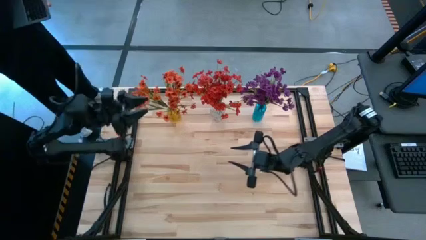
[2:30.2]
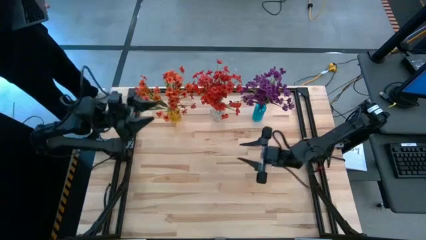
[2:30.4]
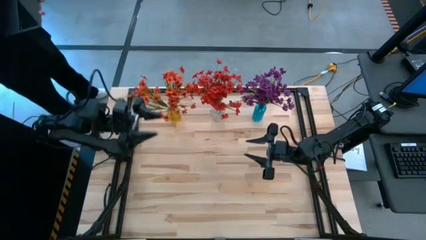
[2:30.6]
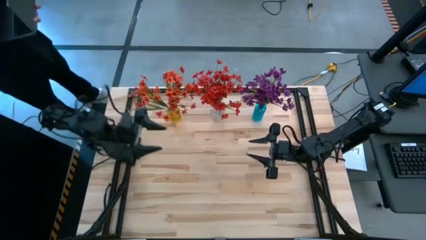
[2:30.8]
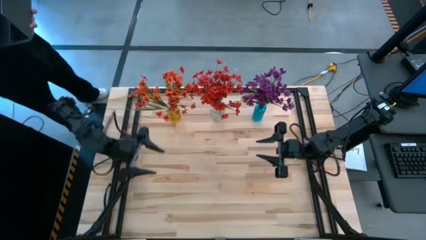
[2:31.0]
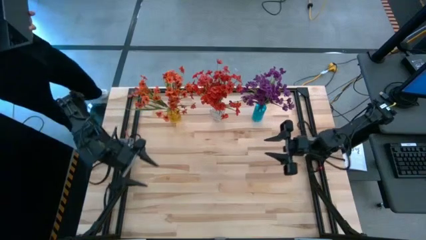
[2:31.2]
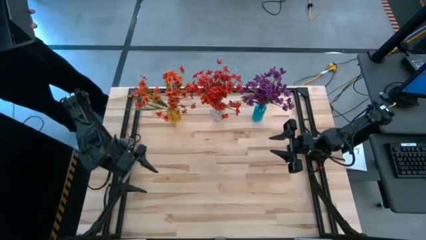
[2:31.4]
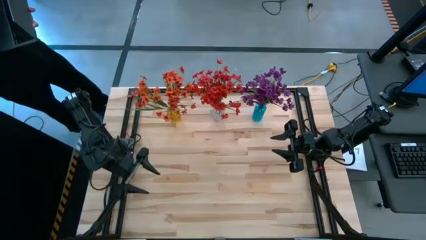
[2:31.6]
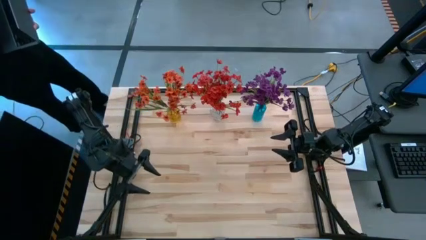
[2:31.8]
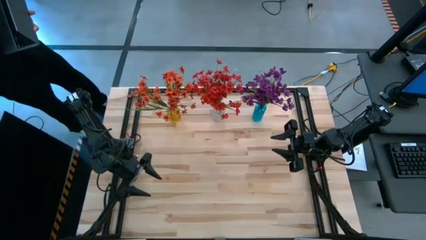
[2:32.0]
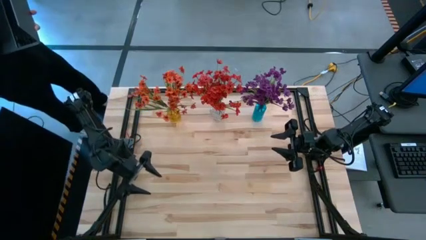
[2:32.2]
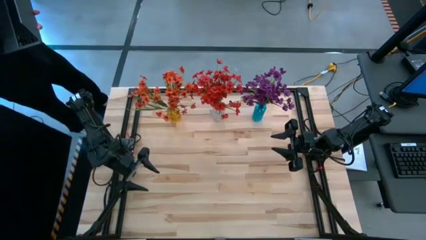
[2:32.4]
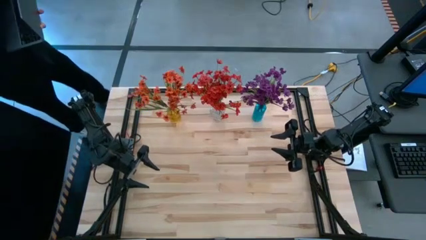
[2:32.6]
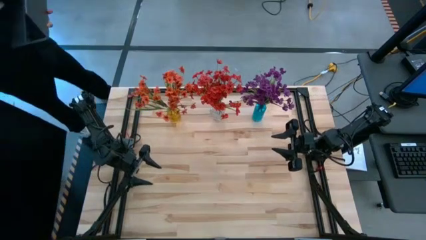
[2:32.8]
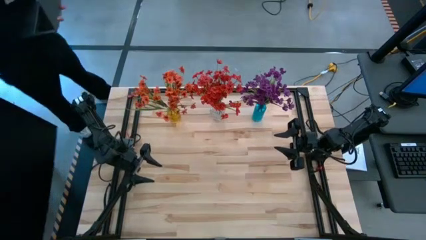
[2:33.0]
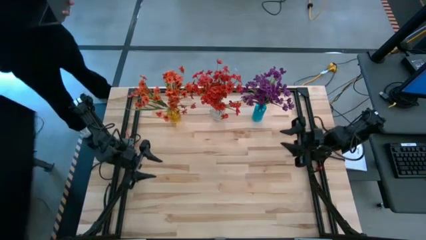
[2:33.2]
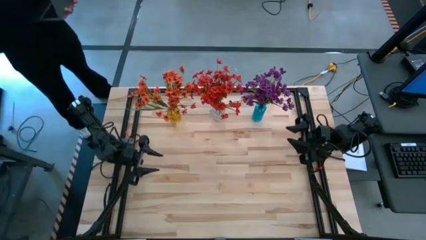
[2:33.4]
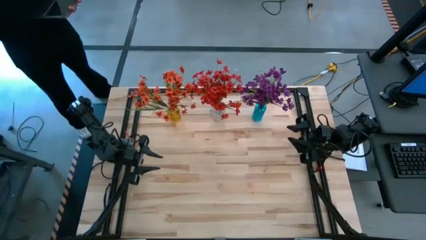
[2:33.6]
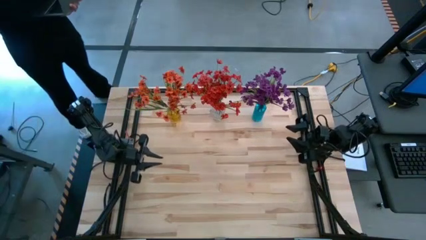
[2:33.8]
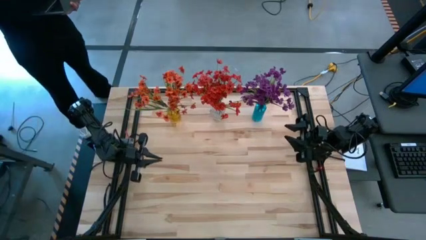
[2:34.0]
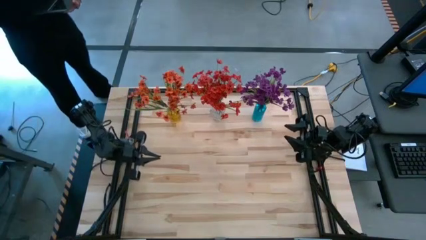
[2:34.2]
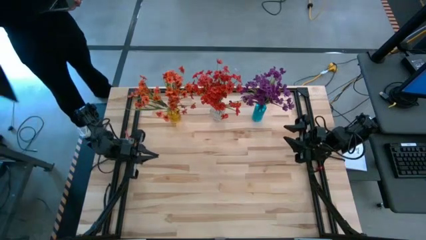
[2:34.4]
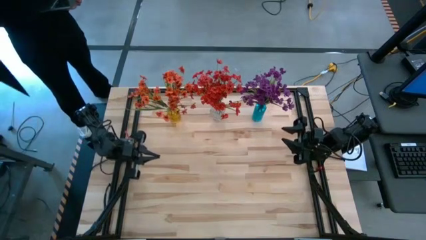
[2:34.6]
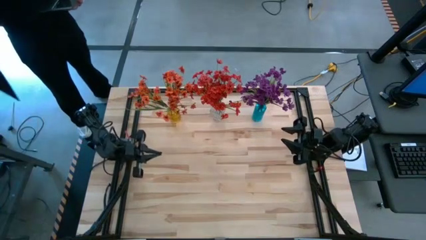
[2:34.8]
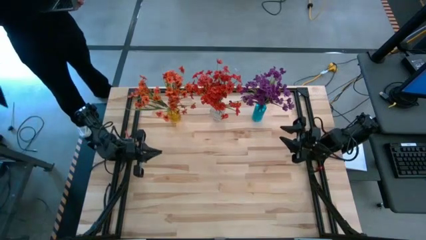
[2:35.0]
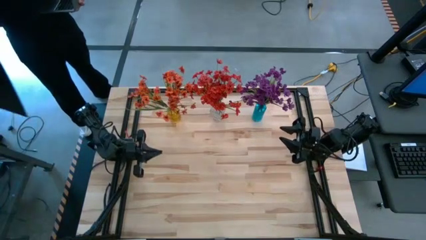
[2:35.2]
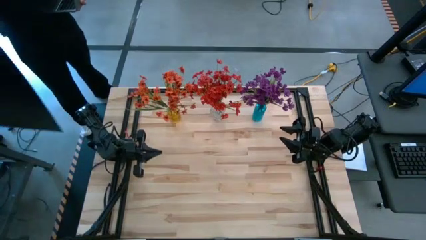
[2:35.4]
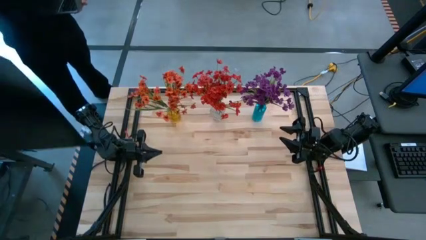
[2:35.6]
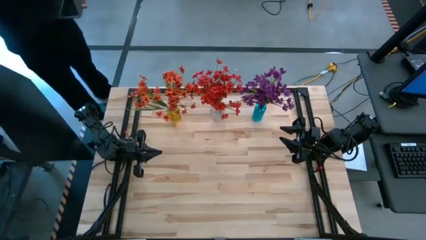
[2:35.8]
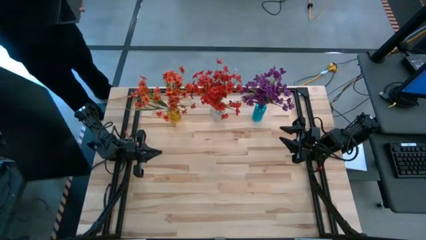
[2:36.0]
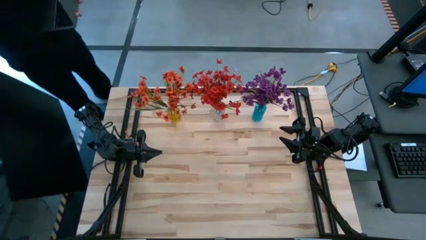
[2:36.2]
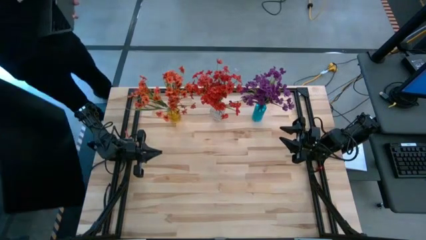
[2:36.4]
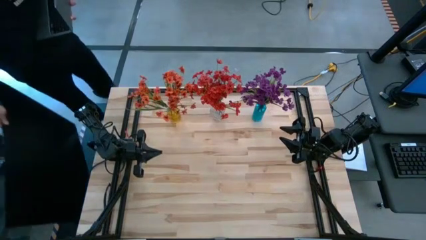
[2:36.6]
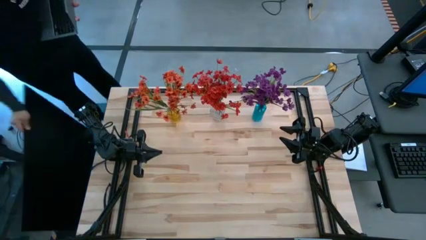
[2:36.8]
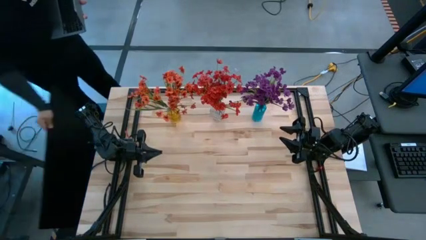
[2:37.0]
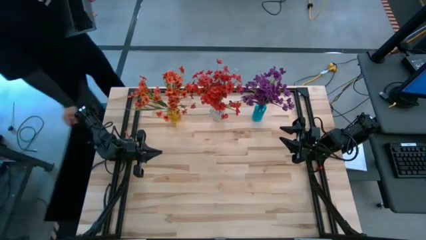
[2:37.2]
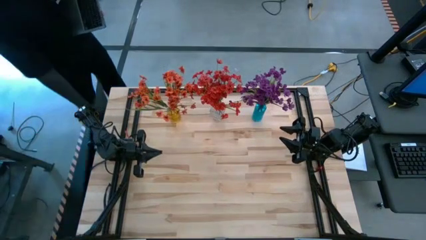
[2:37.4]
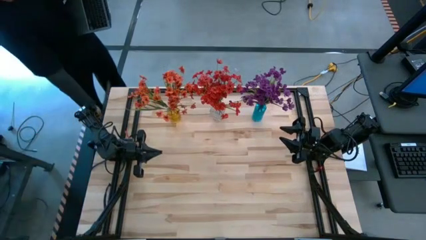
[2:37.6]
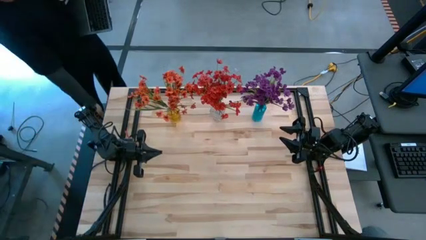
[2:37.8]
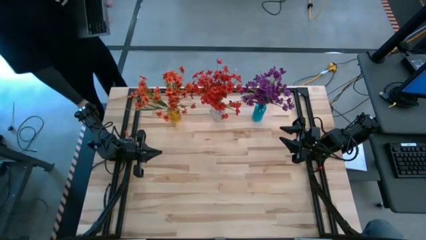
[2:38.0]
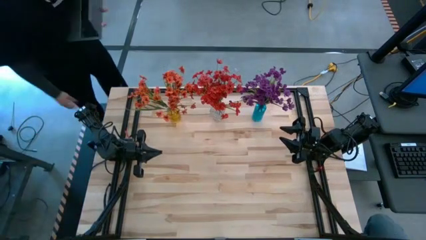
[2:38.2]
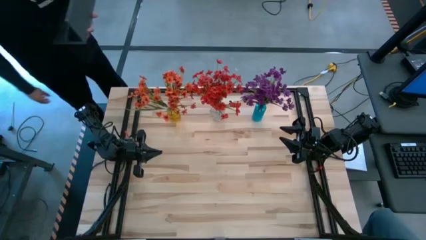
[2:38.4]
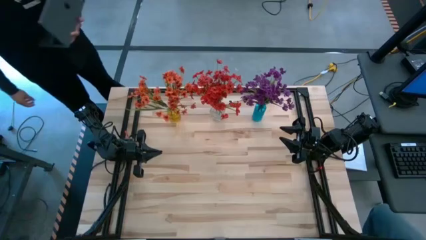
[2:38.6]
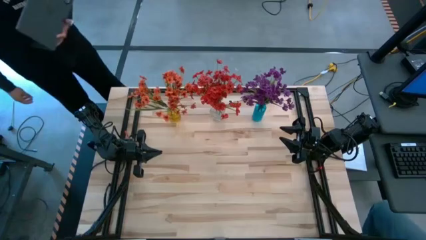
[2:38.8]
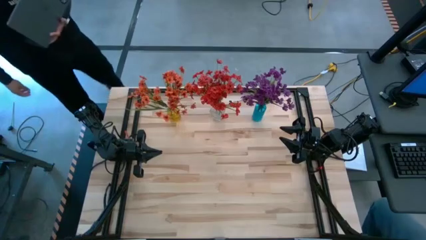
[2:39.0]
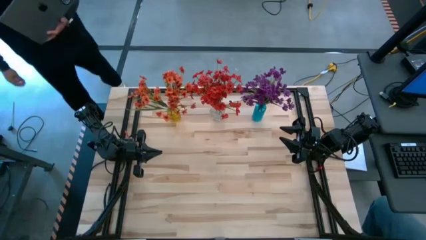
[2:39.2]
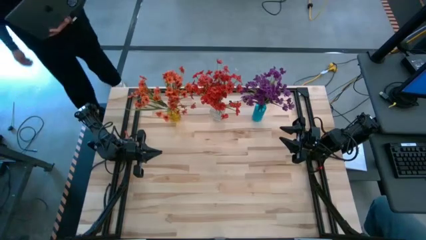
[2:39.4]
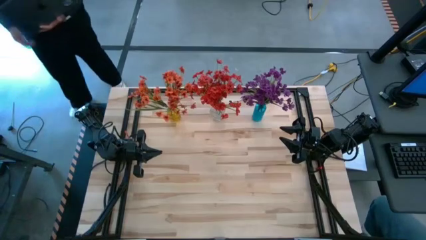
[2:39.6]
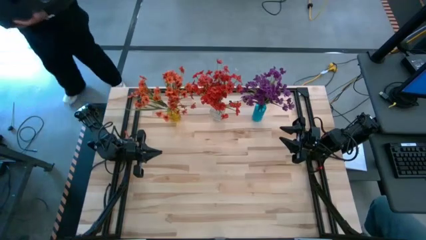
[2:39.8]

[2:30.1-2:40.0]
Task: Sort flowers into vase by color
Return to Home Position

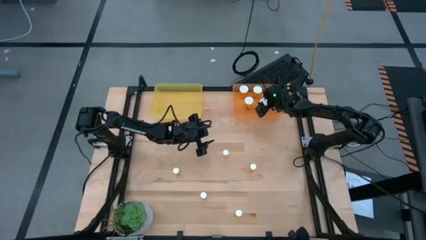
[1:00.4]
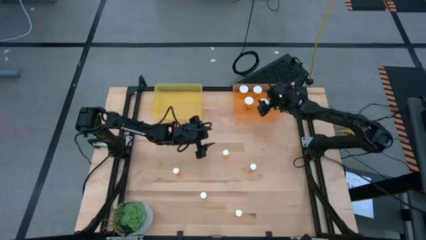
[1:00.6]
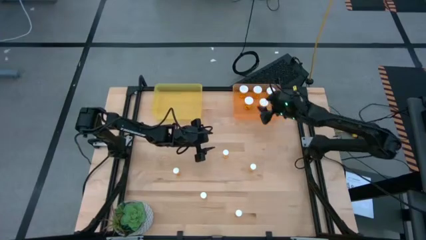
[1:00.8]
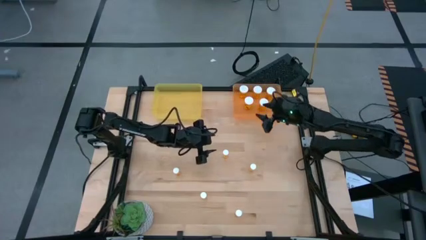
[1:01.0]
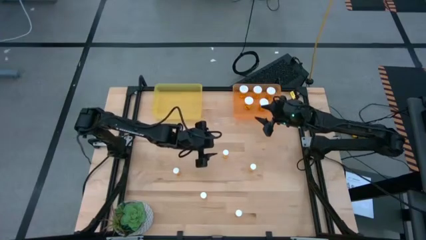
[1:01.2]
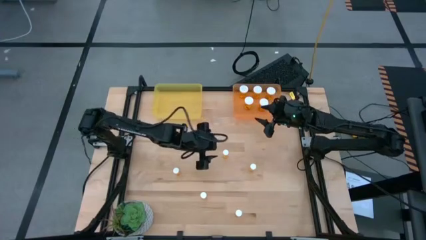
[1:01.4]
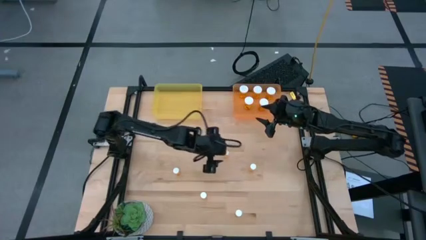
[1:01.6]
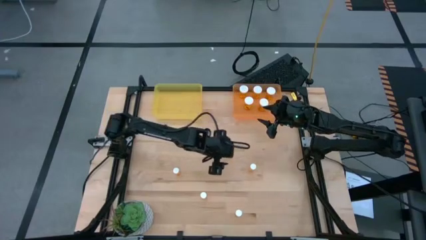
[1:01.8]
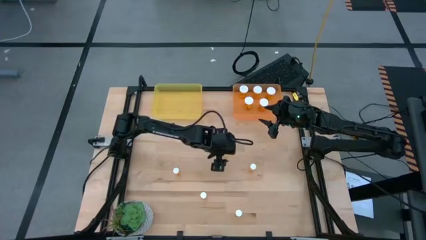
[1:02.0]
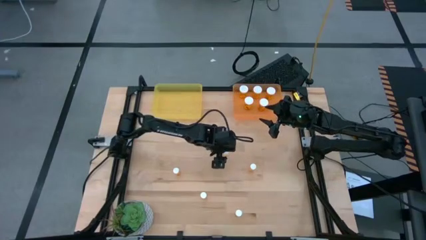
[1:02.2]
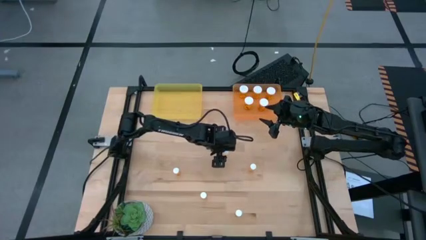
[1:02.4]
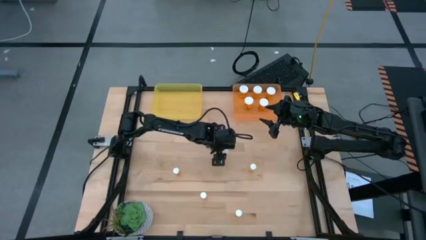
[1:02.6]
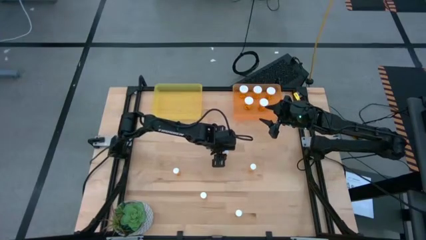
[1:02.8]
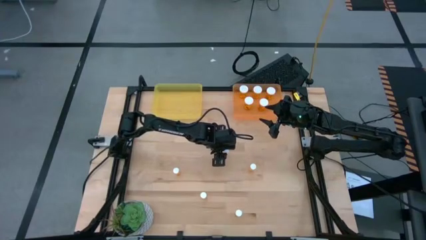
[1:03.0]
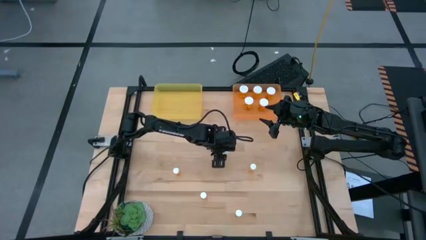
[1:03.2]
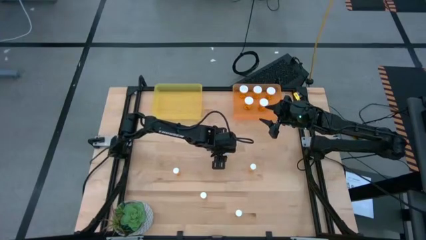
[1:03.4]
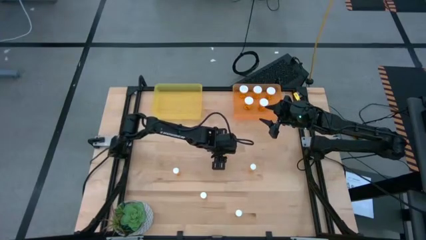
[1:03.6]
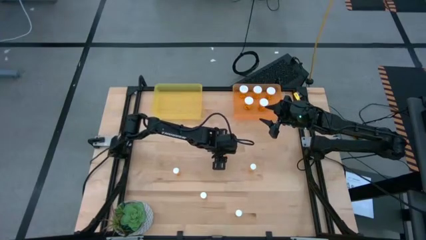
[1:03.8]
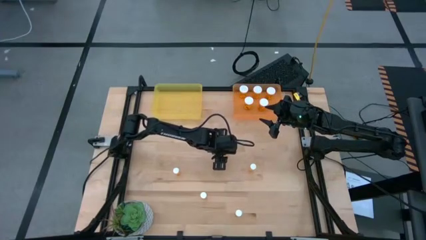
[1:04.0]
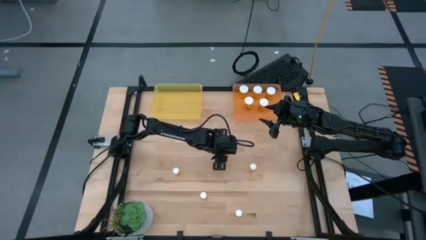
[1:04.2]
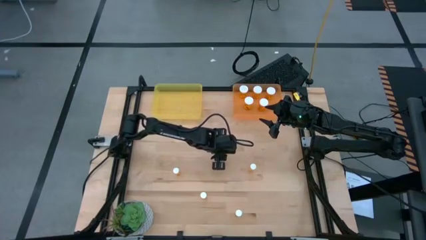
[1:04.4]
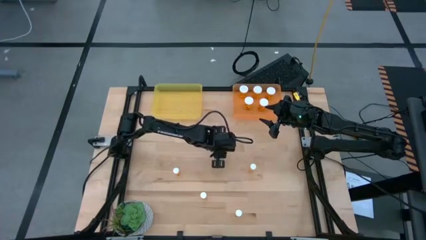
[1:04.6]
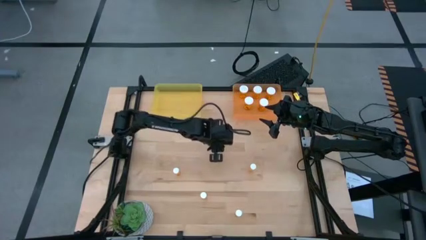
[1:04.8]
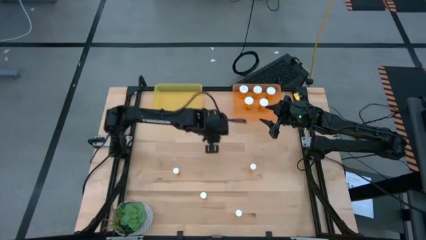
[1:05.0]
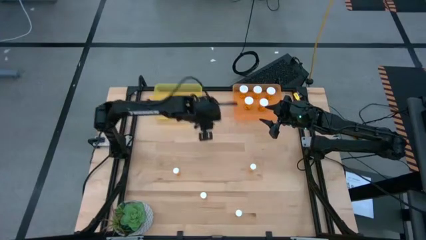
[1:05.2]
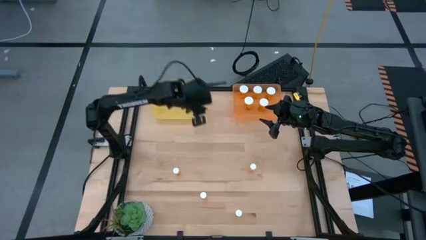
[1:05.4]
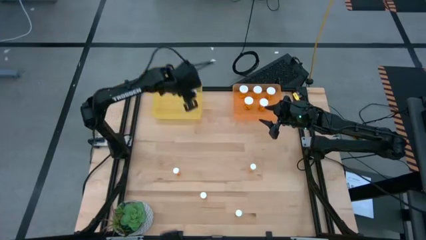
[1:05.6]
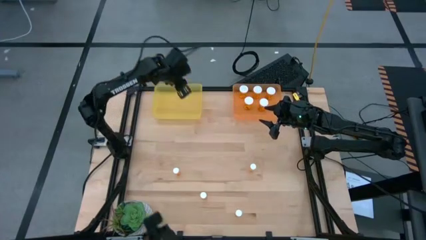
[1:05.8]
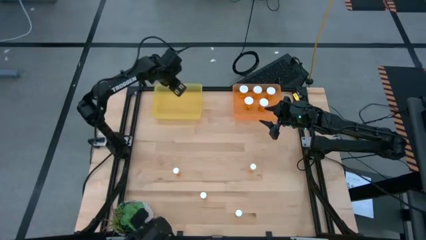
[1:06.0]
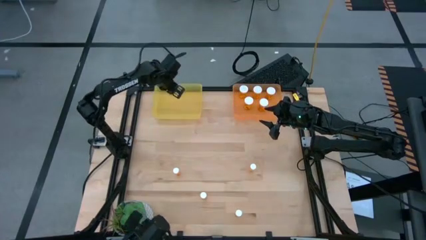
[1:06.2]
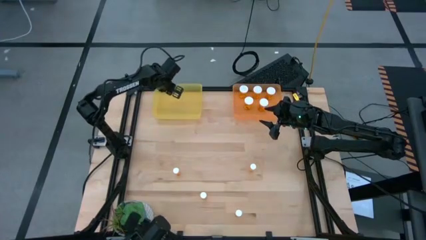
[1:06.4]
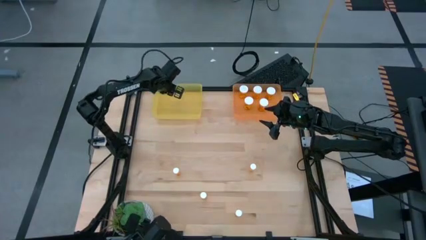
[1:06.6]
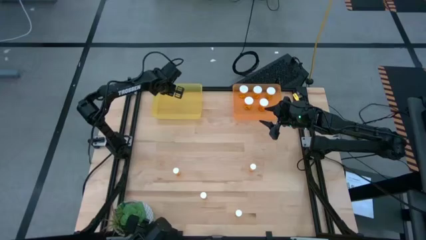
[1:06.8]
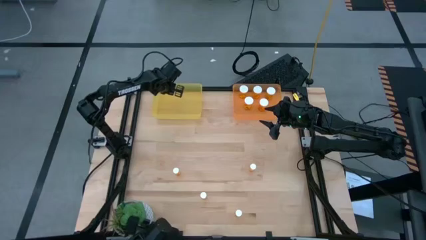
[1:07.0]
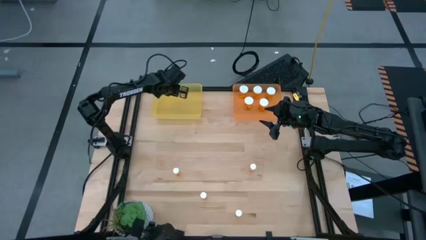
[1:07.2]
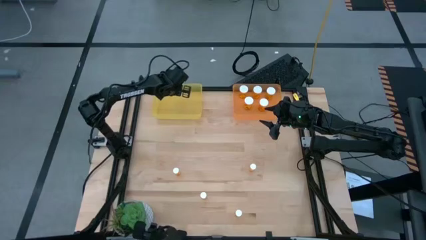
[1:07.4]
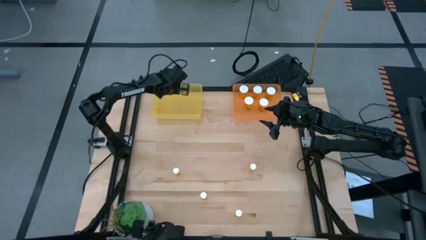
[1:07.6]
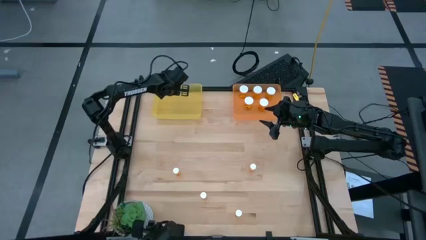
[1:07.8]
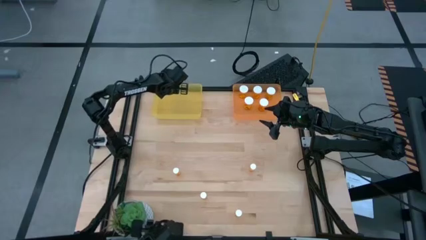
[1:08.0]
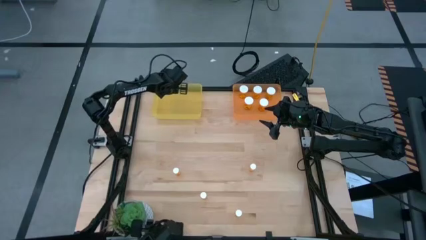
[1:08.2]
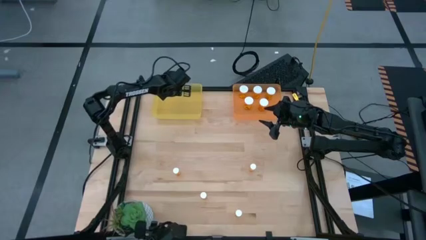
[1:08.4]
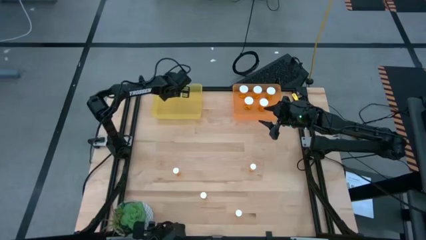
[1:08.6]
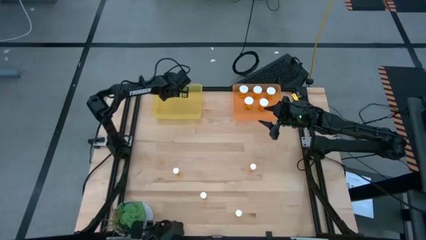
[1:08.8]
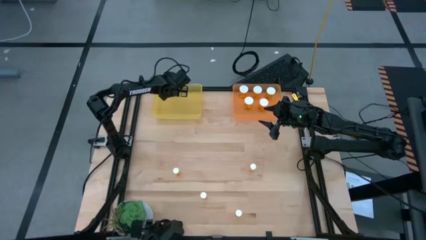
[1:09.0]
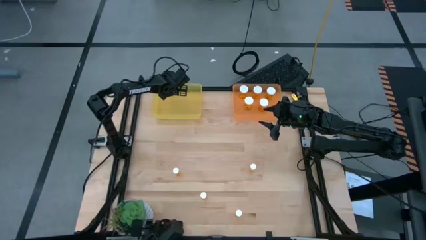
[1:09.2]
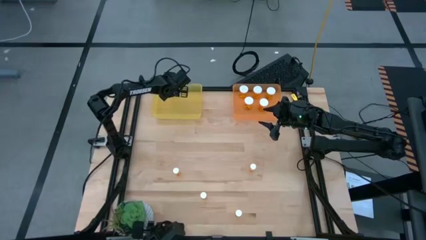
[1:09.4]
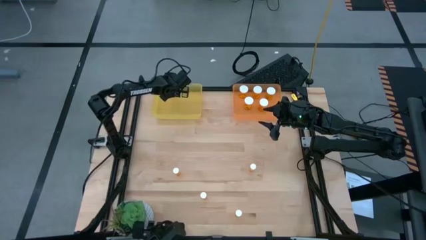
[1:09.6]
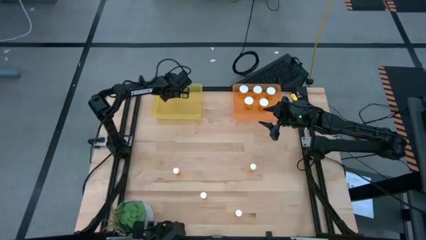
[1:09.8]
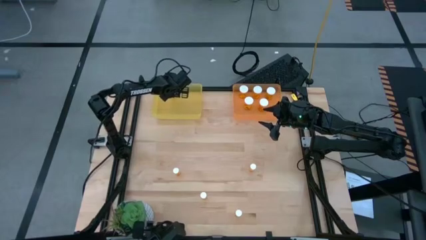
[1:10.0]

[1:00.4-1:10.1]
Task: Pick and place medicine bottles into bin by pill shape (circle, oval)
Put the small yellow pill bottle into the transparent yellow bin
